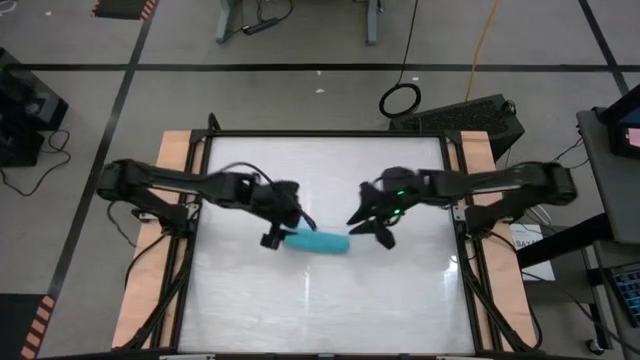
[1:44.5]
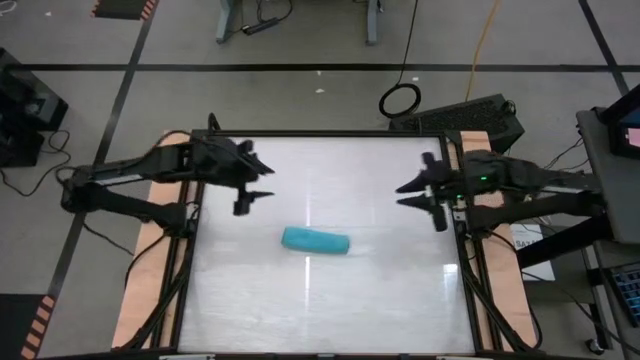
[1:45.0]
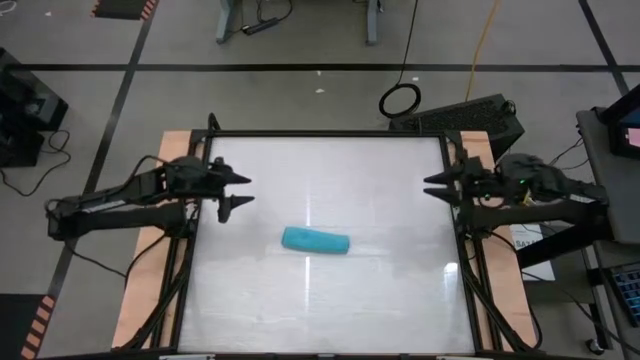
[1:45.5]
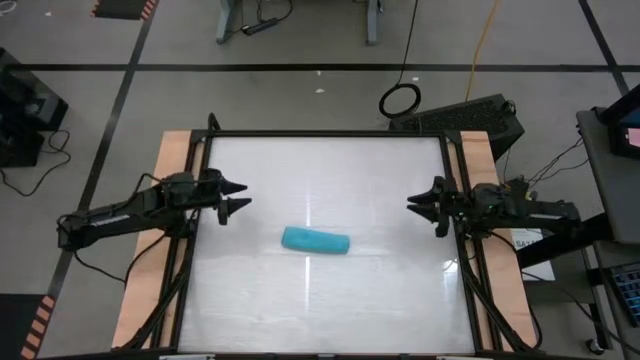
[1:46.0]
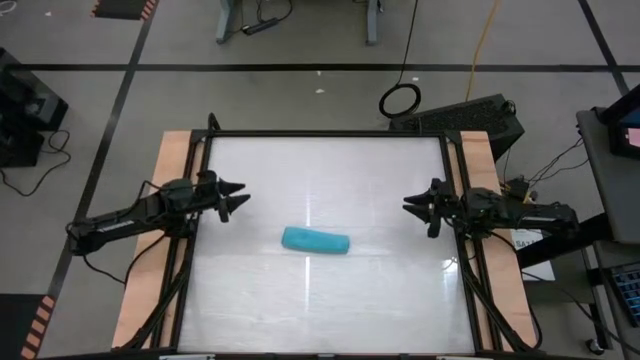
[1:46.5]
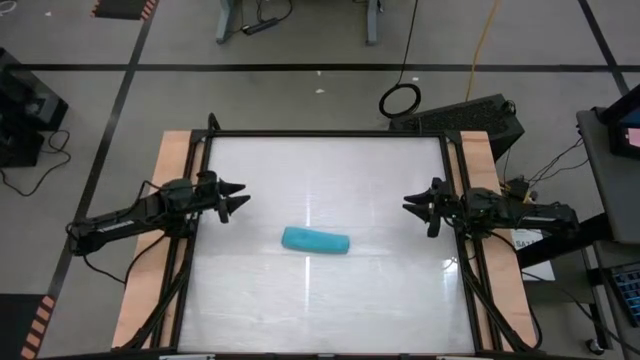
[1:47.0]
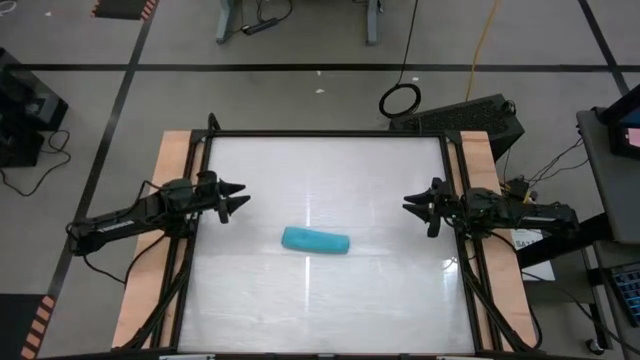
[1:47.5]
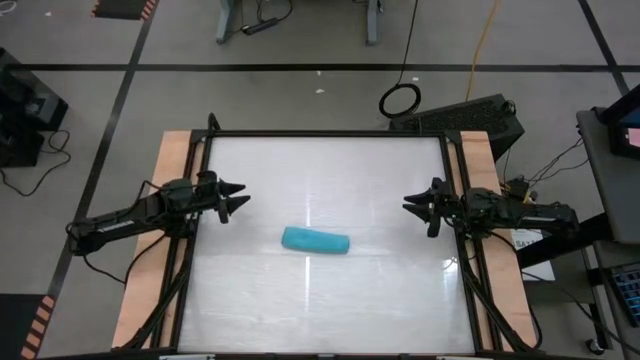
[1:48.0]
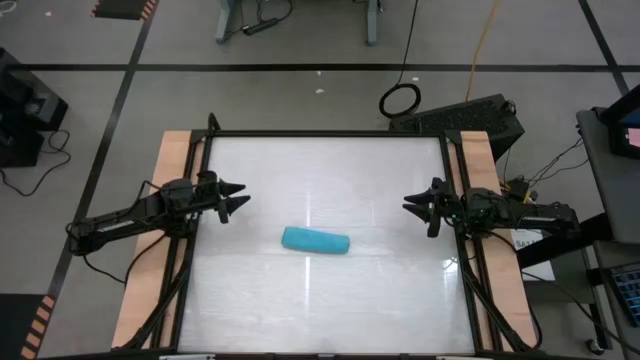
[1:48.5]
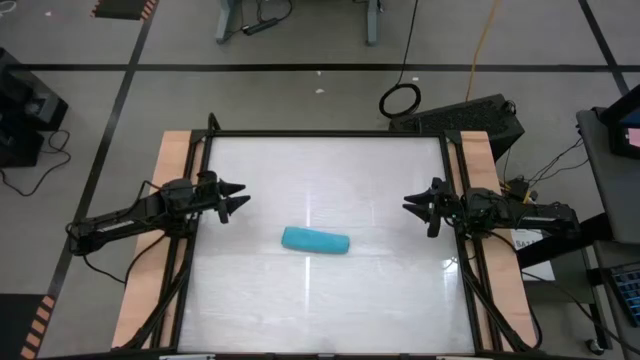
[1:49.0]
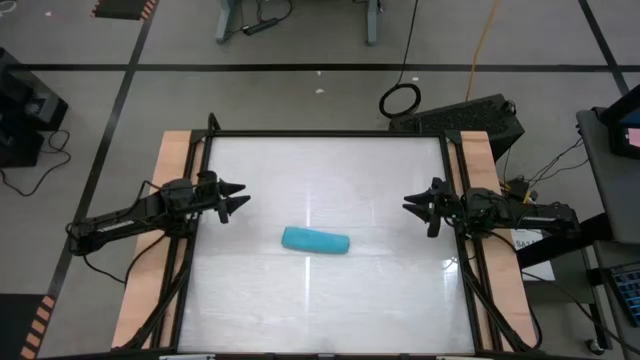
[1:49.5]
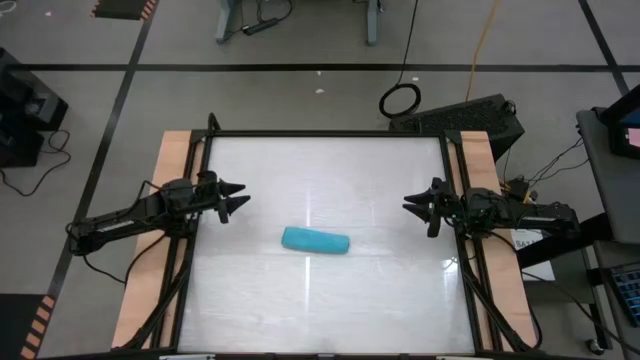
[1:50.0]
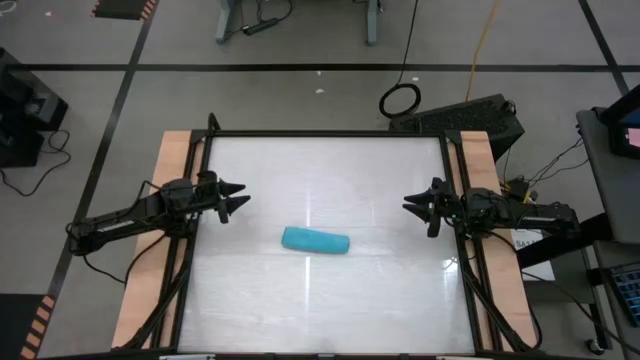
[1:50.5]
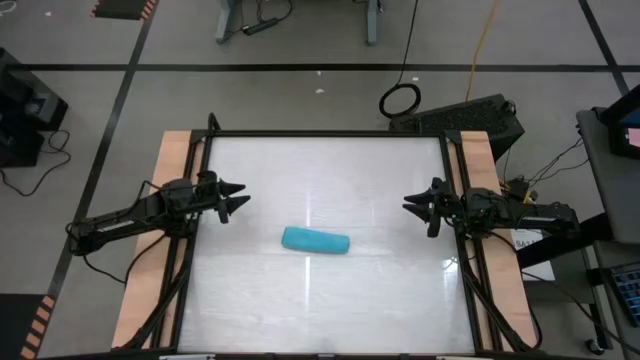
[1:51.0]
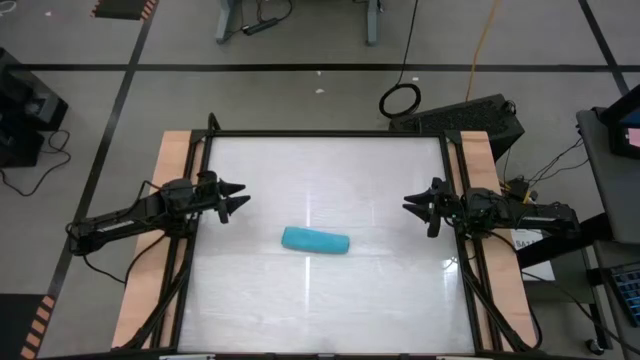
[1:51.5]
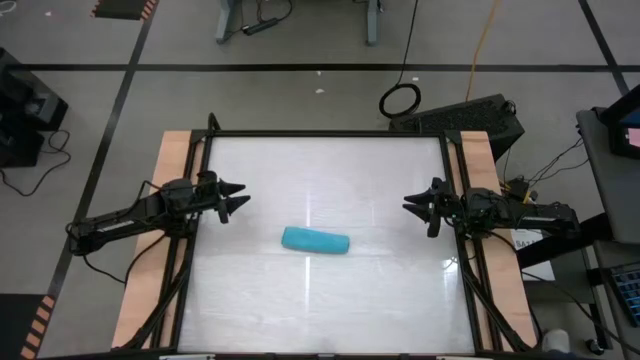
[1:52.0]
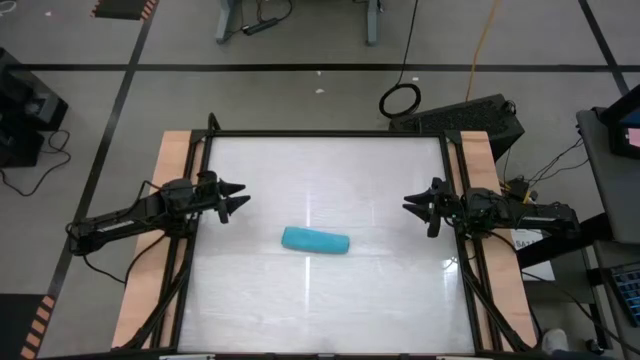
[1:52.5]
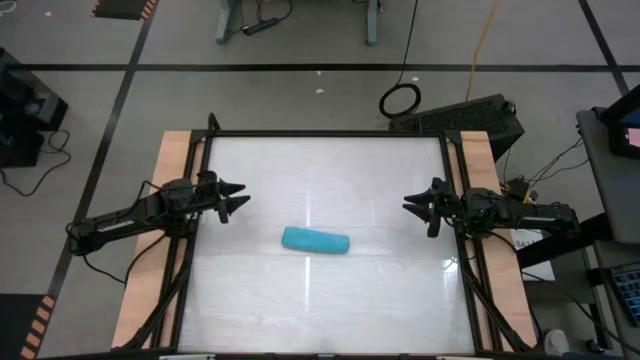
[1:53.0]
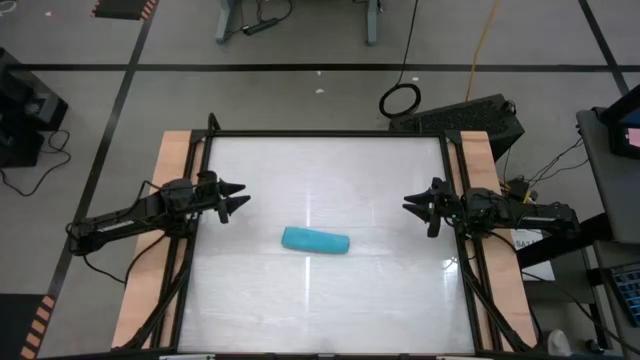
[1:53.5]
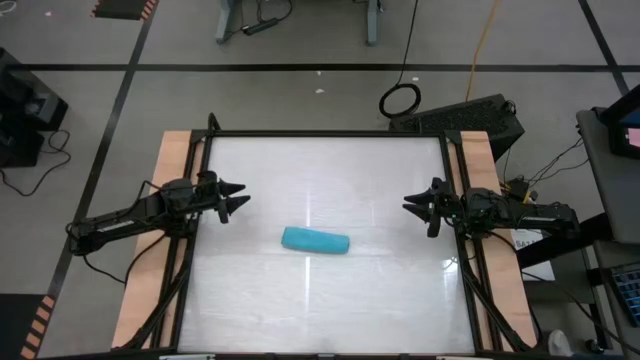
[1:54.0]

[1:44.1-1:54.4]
Task: Roll towel
Return to Home Position

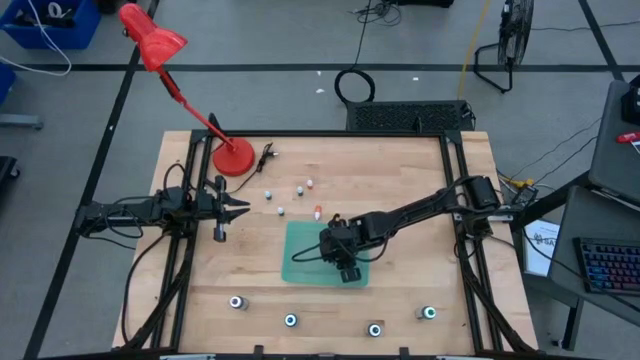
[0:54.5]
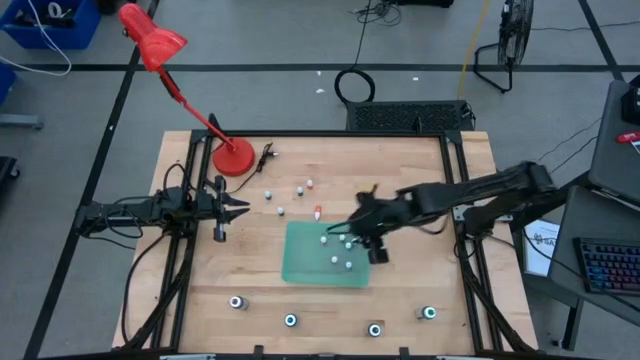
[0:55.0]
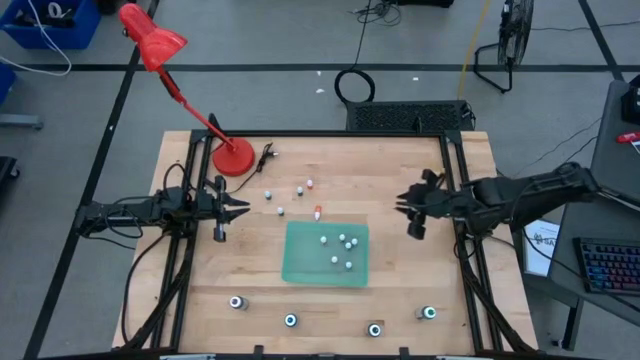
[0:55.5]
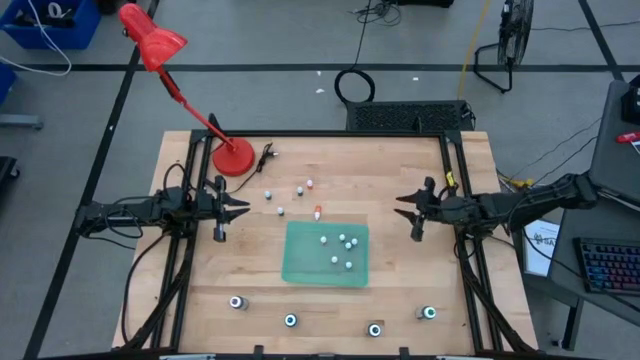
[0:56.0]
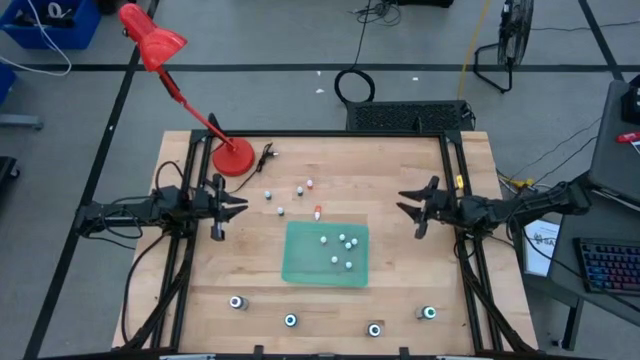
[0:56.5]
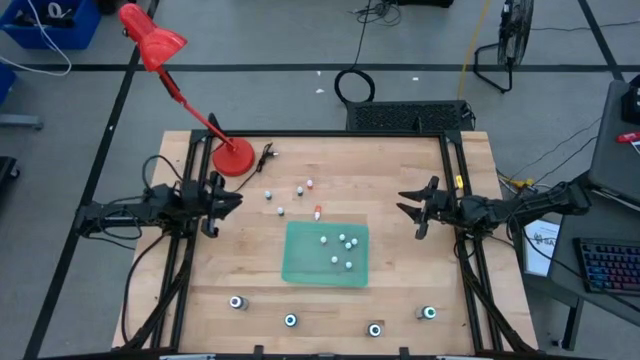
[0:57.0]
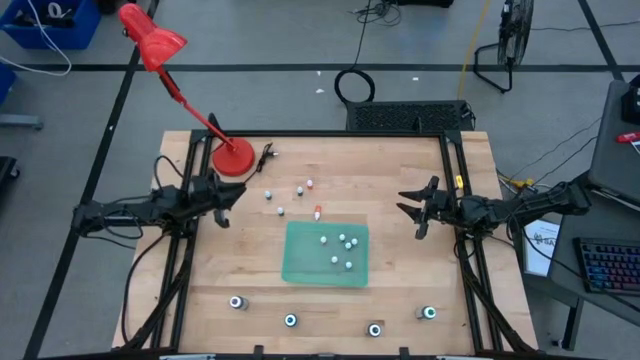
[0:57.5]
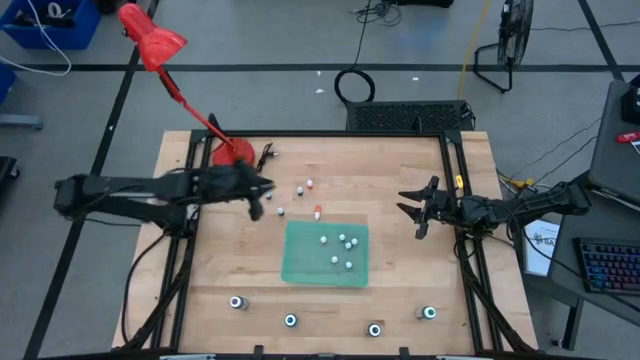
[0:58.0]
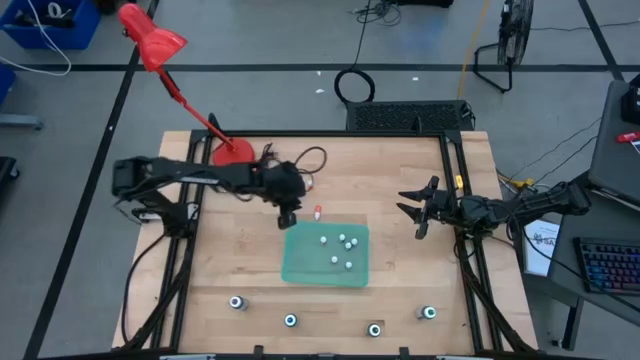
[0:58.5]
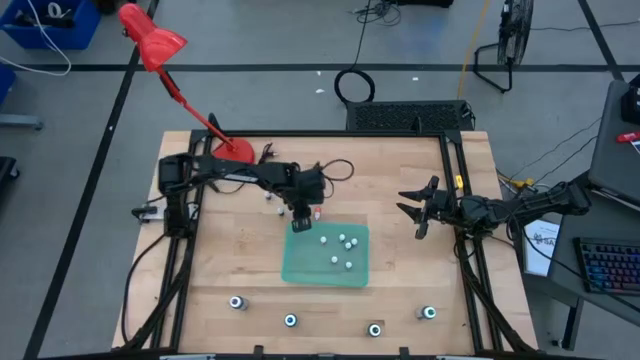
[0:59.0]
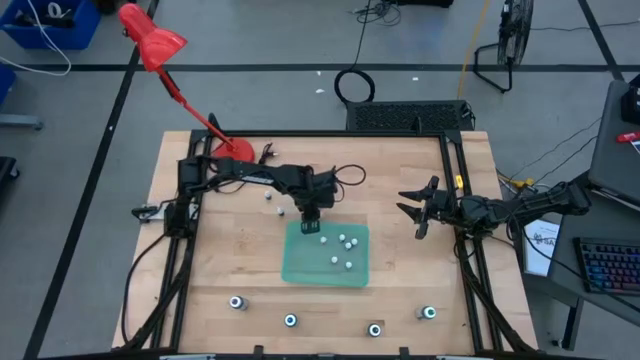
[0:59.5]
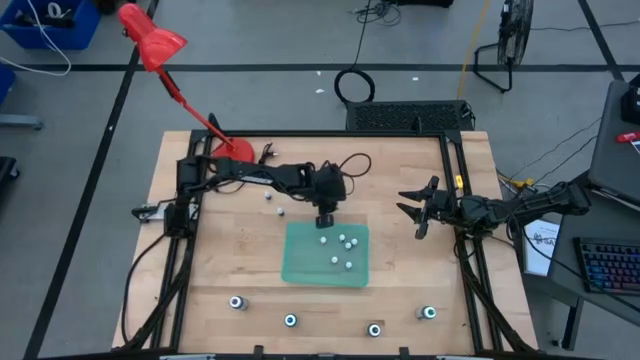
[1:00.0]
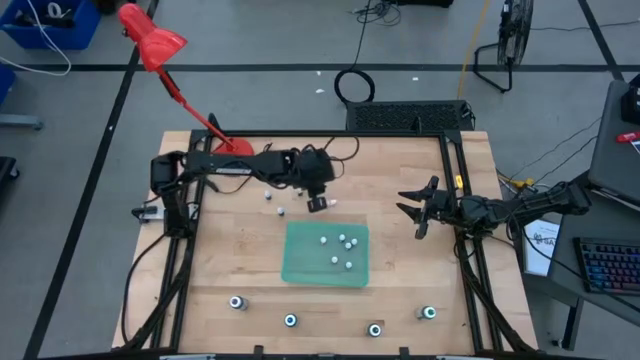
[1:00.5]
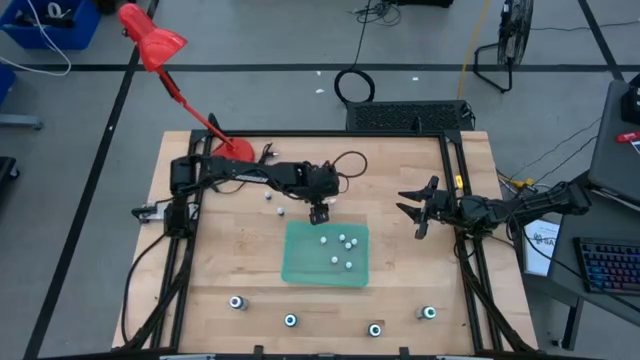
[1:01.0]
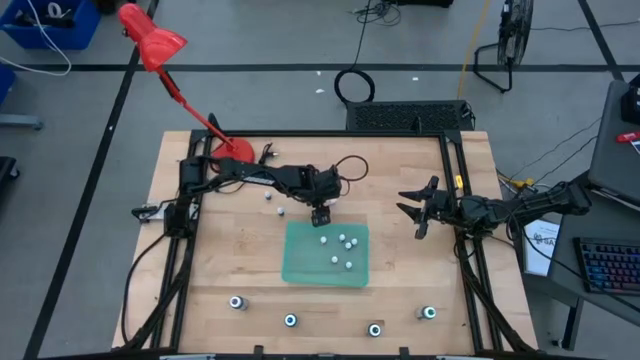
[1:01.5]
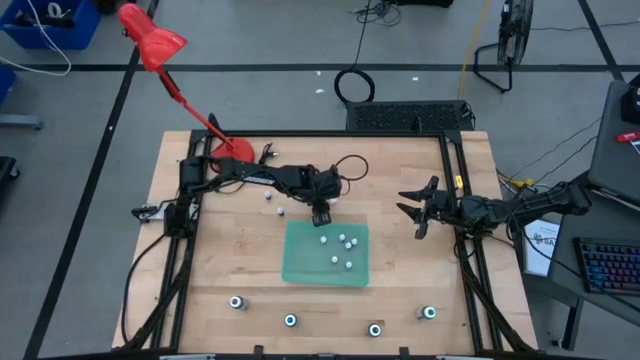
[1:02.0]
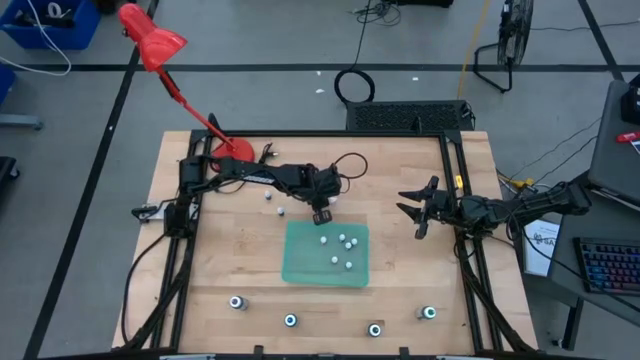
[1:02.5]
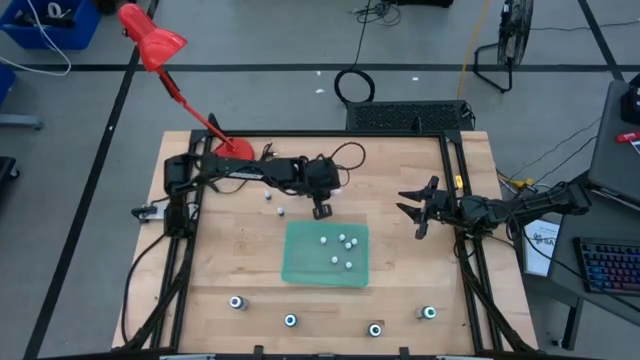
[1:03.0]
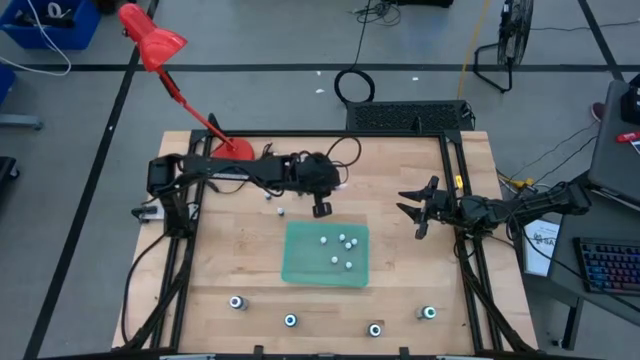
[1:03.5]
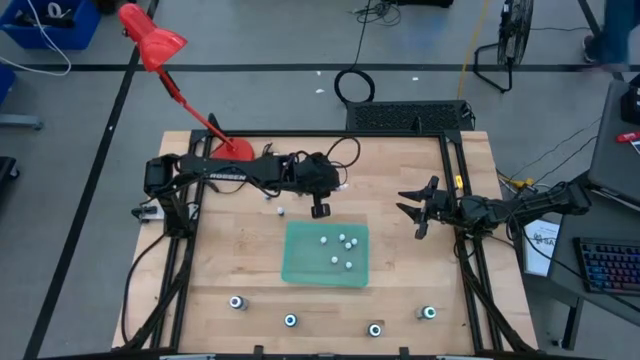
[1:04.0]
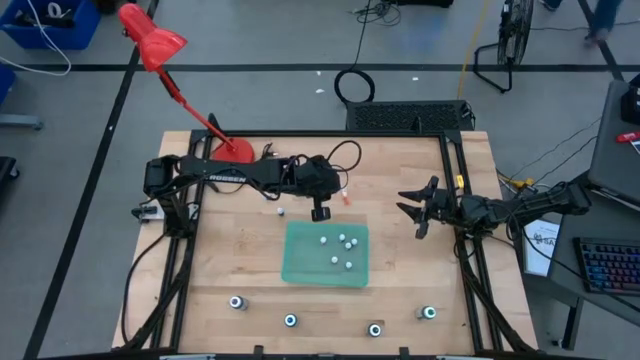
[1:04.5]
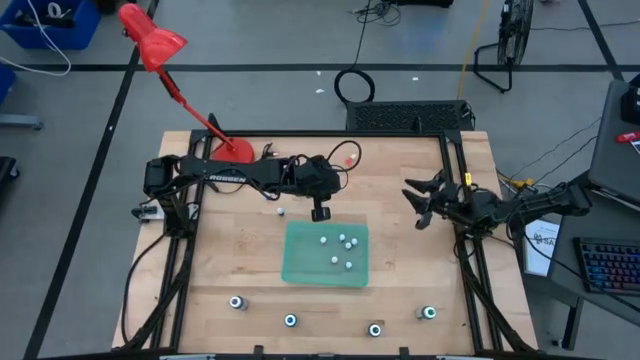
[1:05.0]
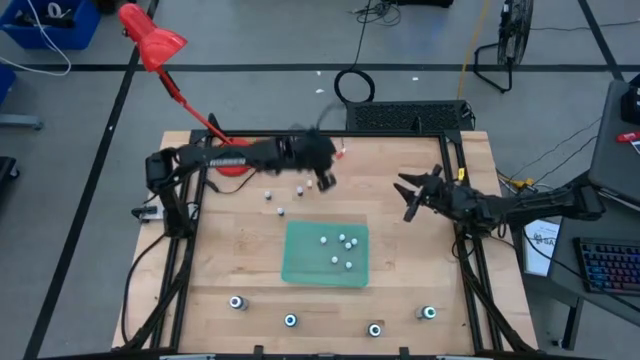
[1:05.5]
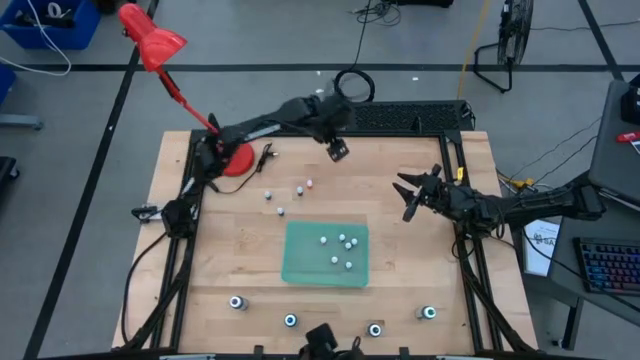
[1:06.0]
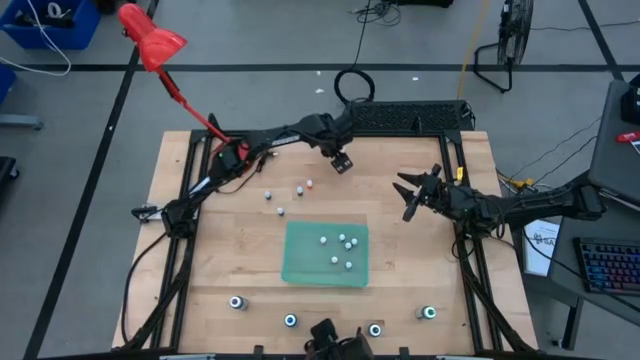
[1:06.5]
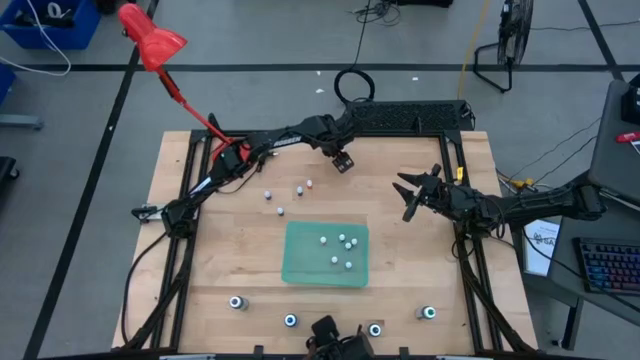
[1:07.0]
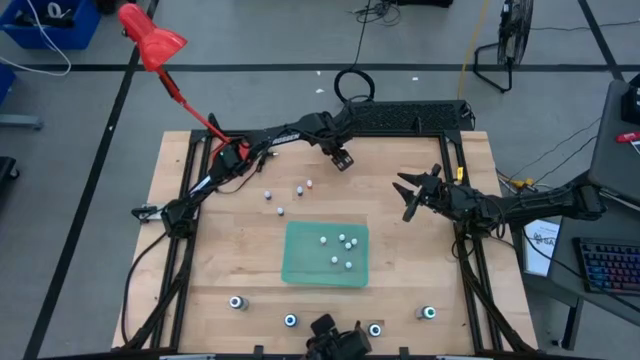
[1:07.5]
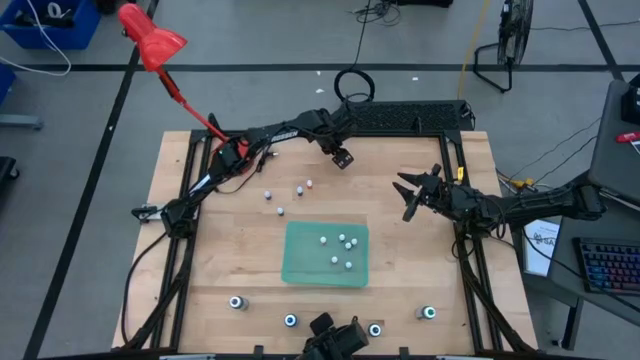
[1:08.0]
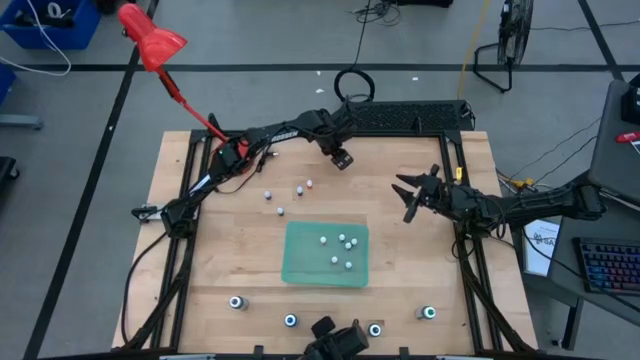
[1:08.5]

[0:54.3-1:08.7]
Task: Pick & Place food coloring
Put the small orange food coloring bottle into the green bin
